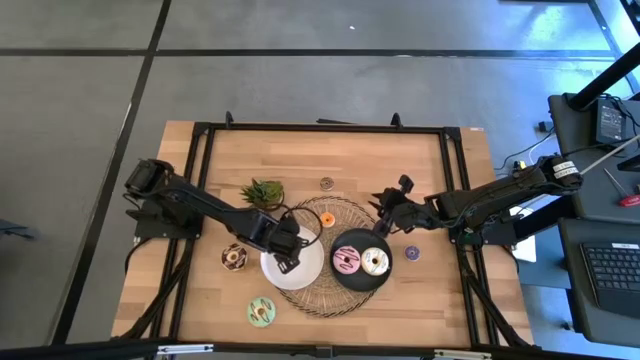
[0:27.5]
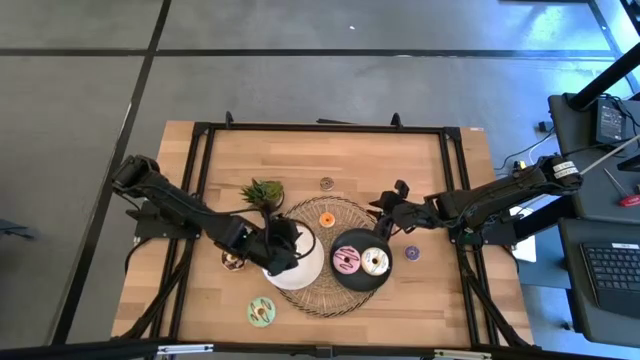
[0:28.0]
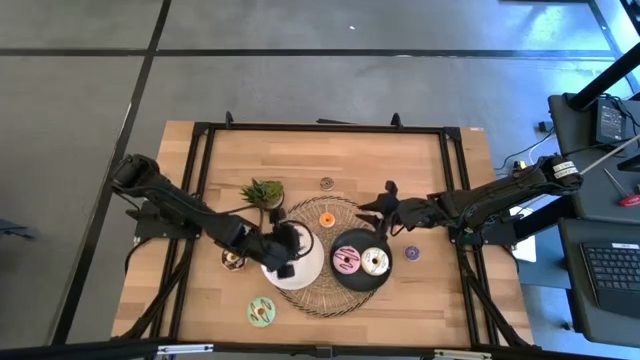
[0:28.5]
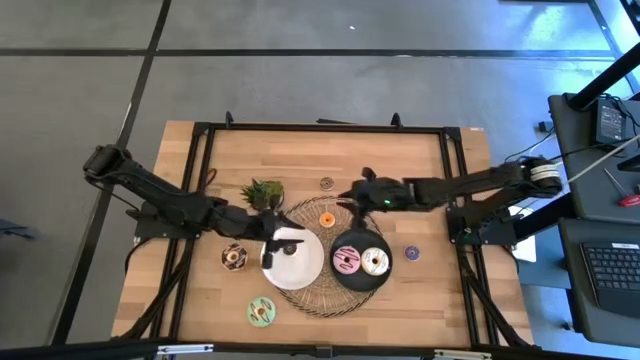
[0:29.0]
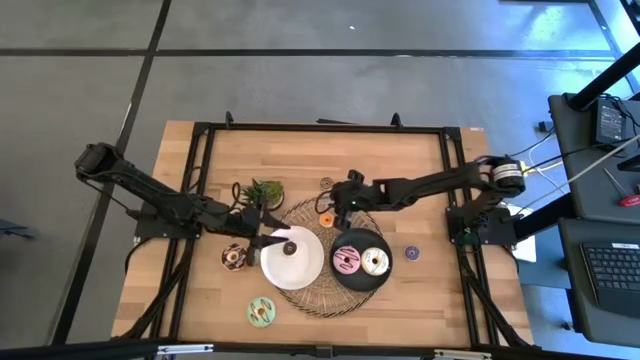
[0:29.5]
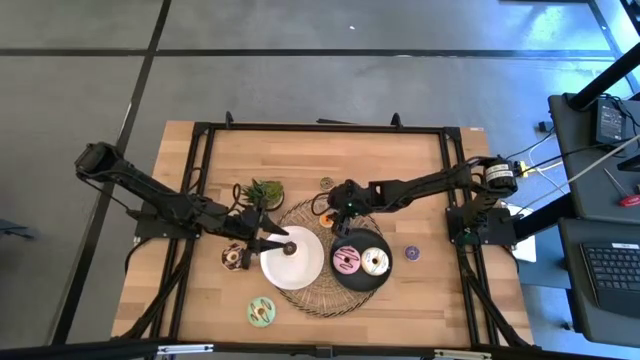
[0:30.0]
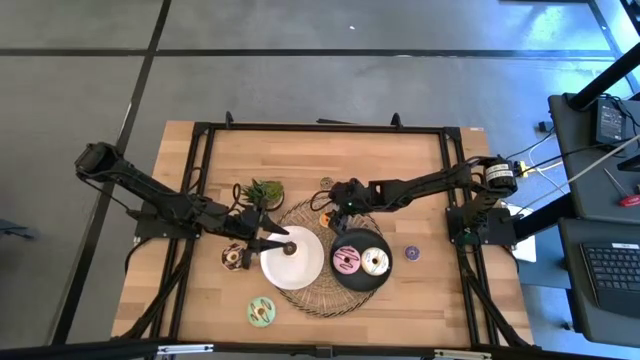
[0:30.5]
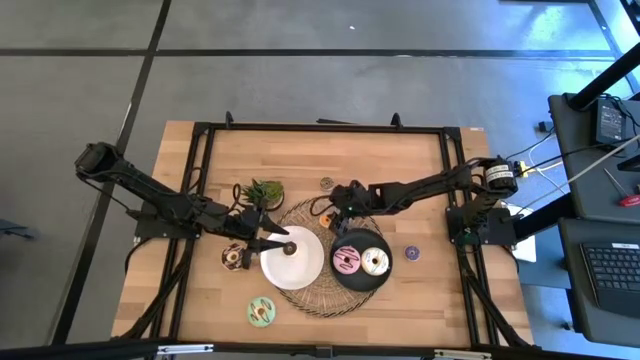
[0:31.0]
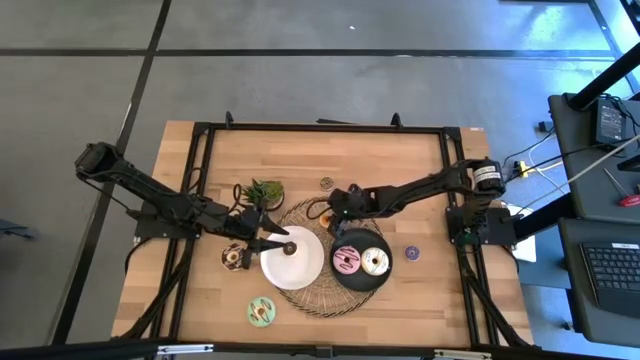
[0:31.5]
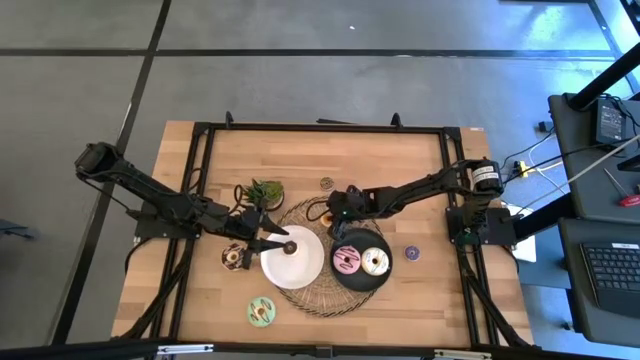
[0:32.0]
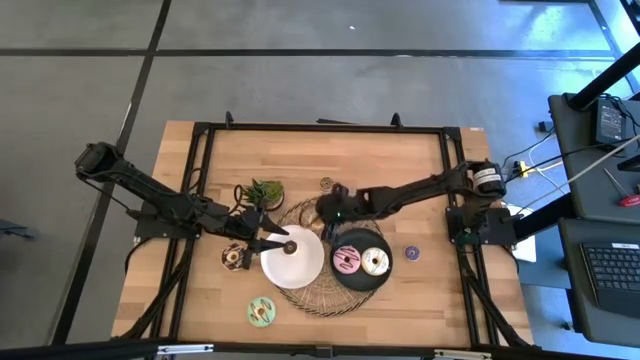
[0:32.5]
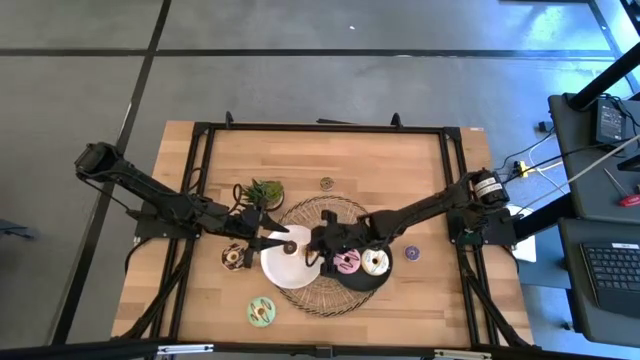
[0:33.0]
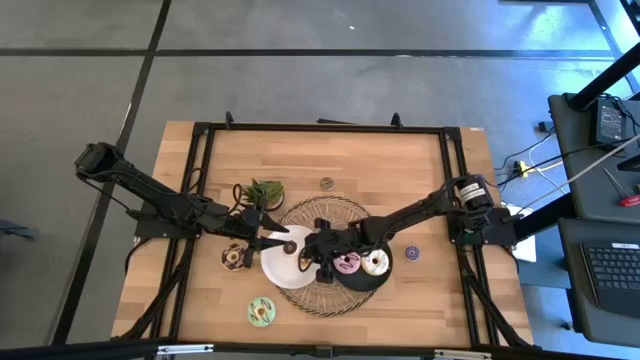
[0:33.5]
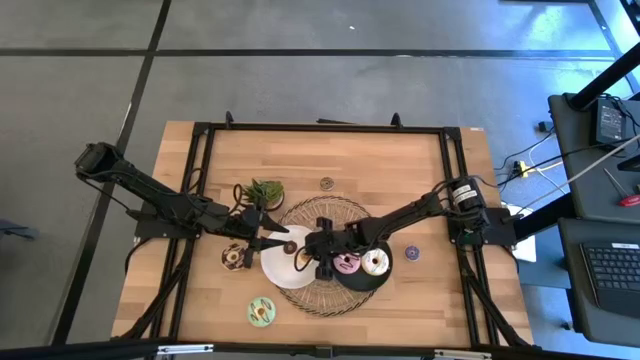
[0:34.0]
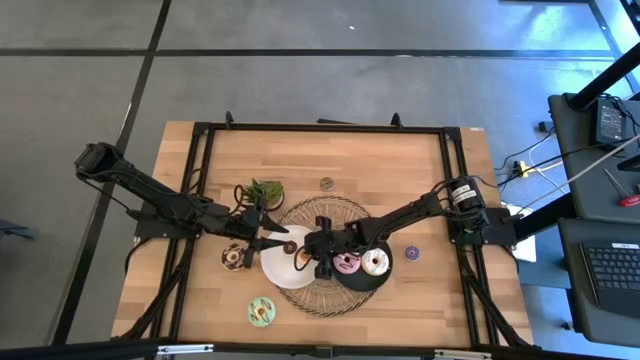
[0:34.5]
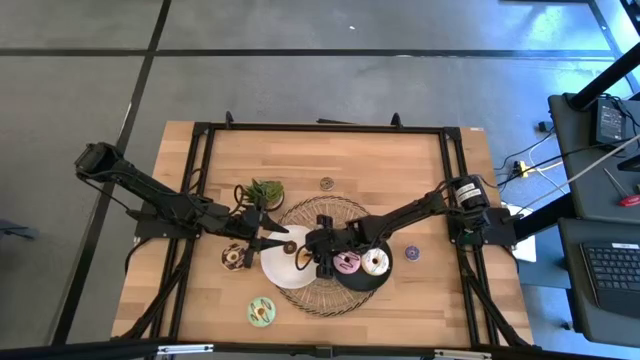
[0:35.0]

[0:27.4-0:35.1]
Task: Pick & Place donuts
Put the small yellow donut on the white plate

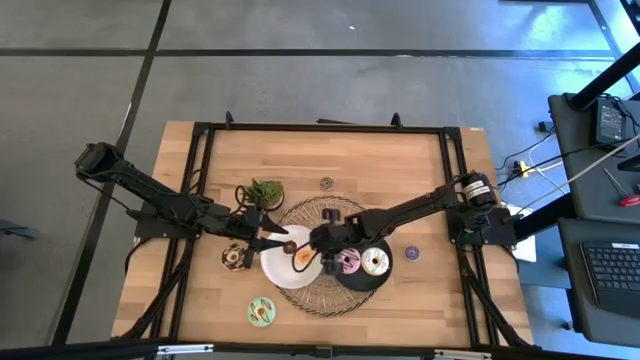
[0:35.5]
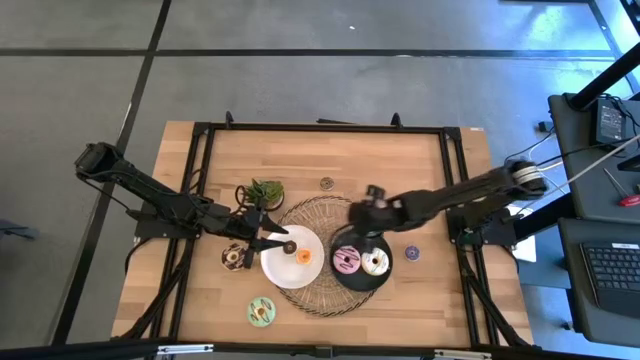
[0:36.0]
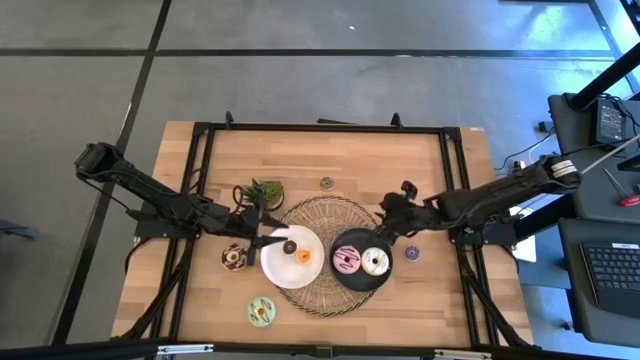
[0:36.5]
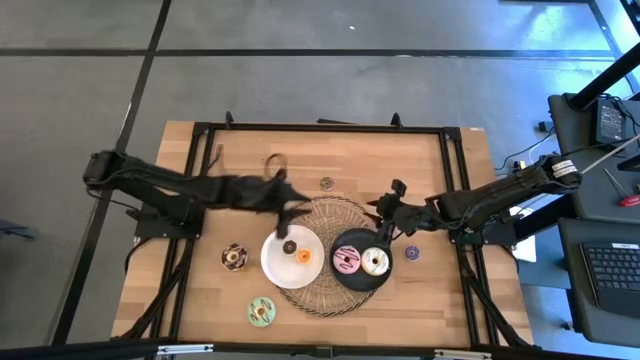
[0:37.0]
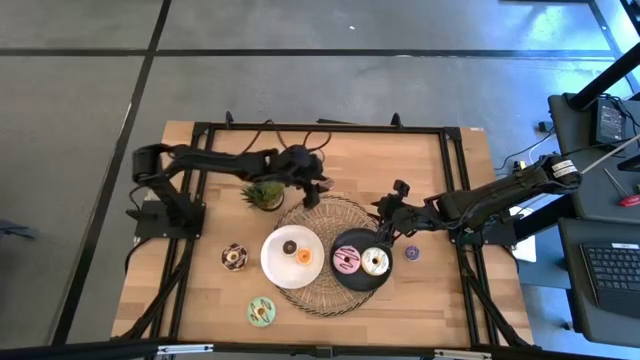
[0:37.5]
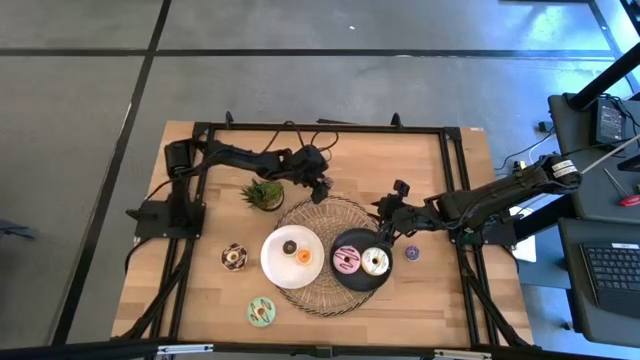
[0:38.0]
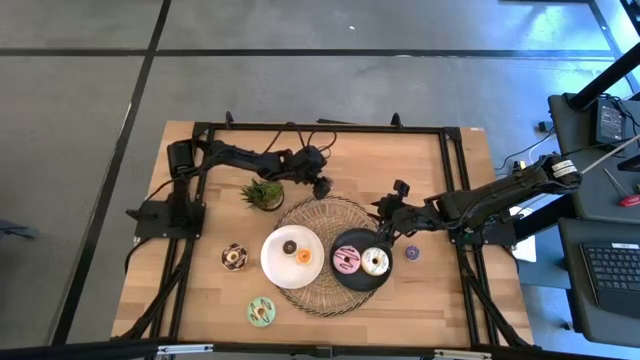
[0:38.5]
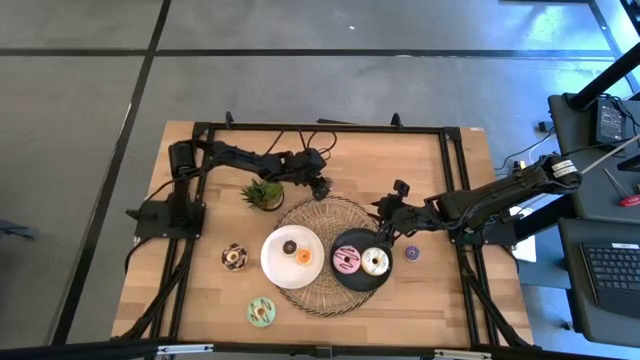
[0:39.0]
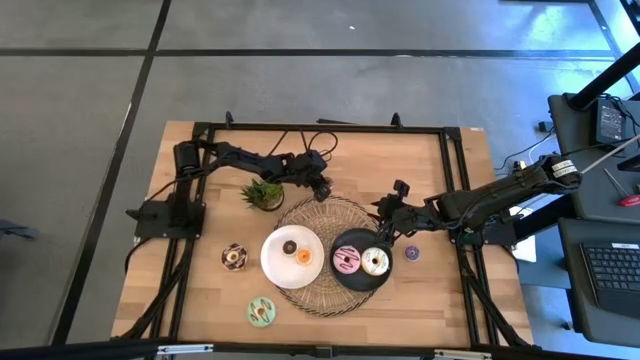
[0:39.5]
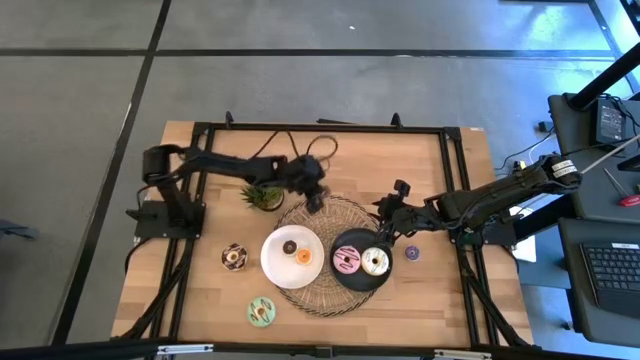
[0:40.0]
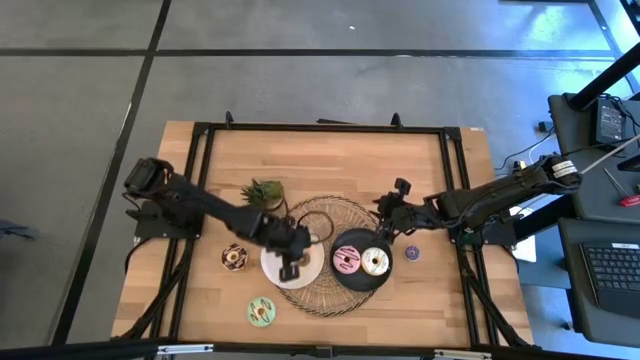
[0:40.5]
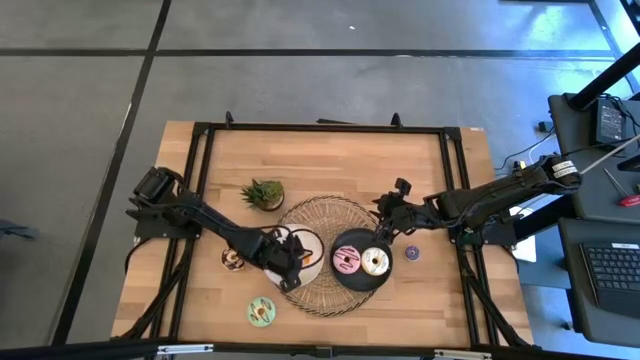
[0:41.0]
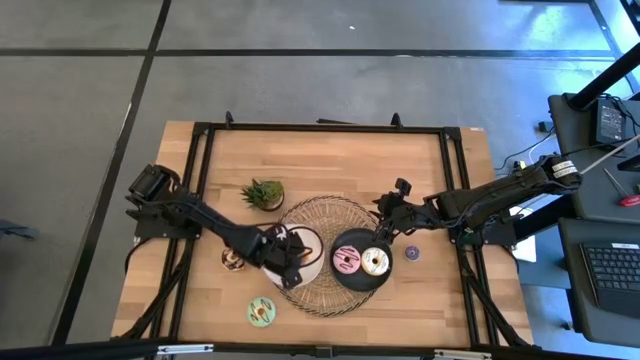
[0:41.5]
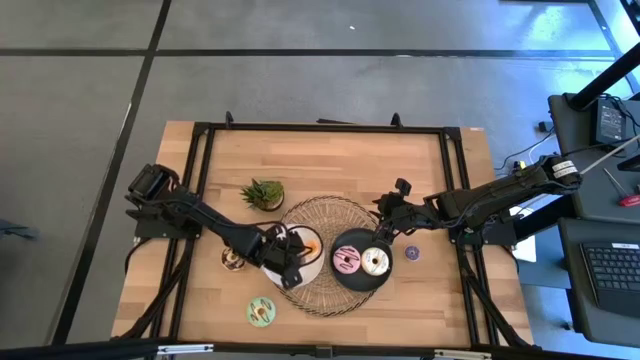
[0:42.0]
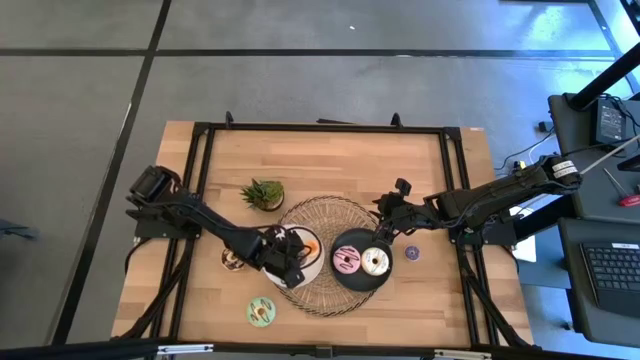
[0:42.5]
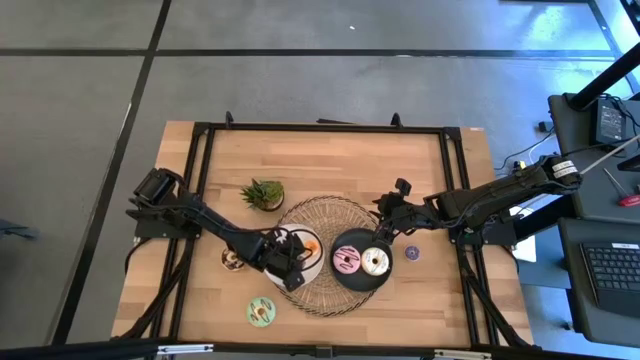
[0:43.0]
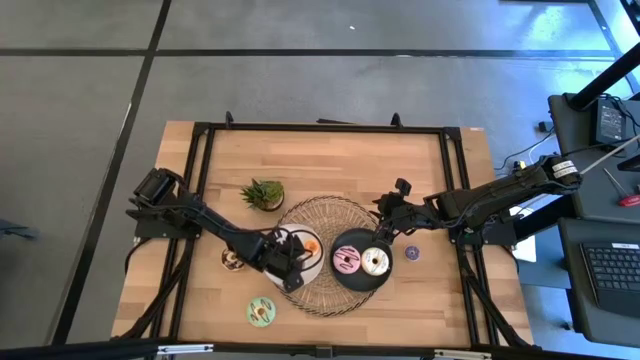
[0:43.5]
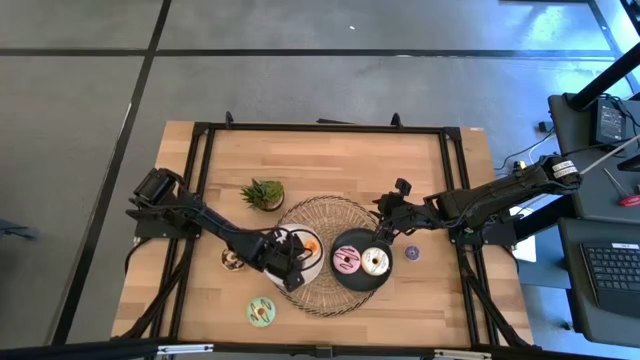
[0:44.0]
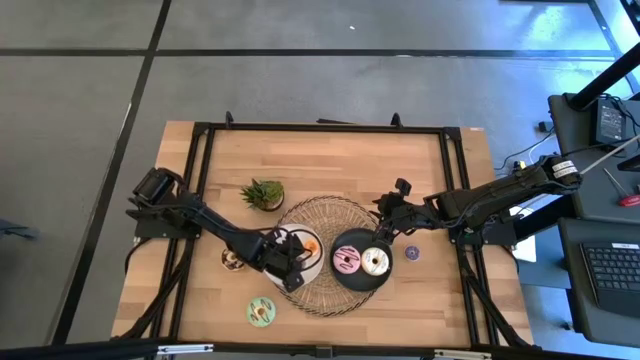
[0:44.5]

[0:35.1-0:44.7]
Put the small brown donut on the white plate

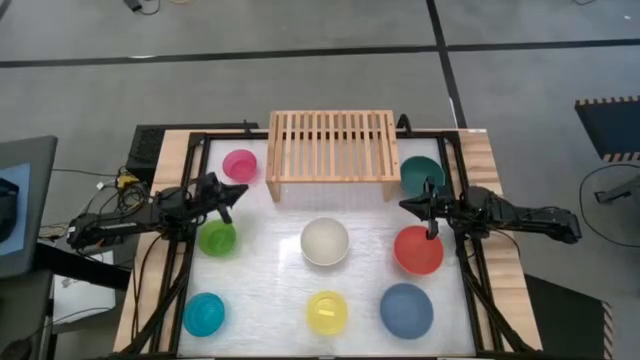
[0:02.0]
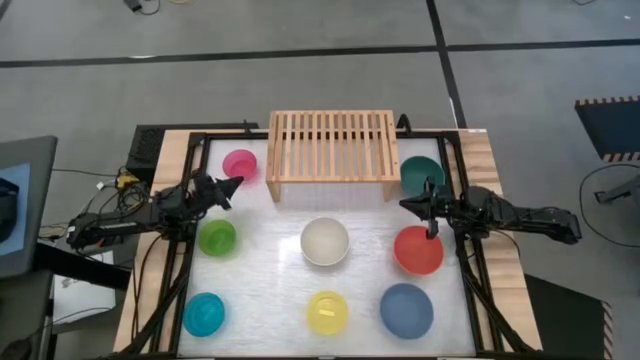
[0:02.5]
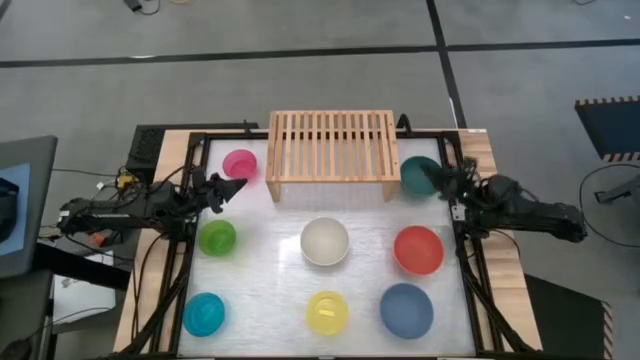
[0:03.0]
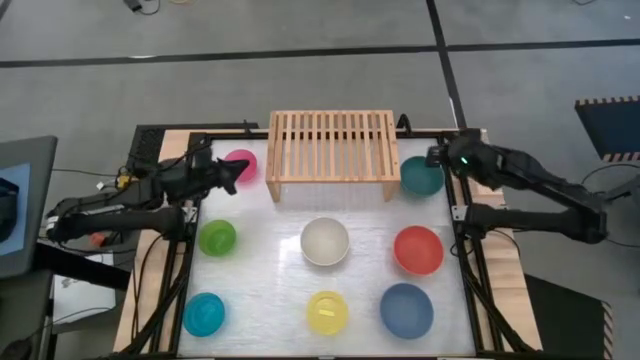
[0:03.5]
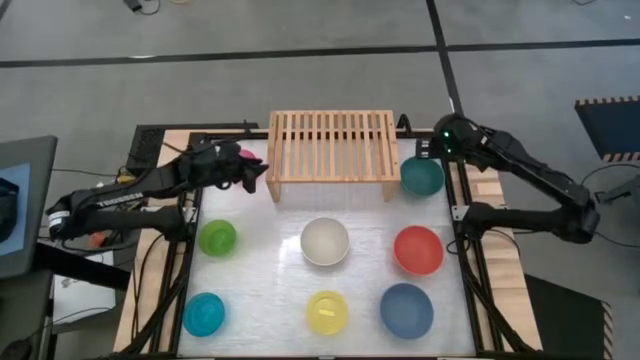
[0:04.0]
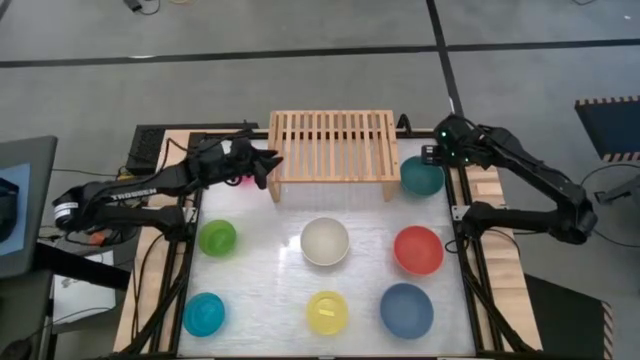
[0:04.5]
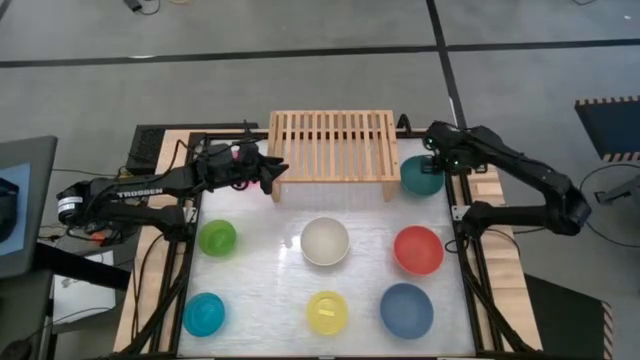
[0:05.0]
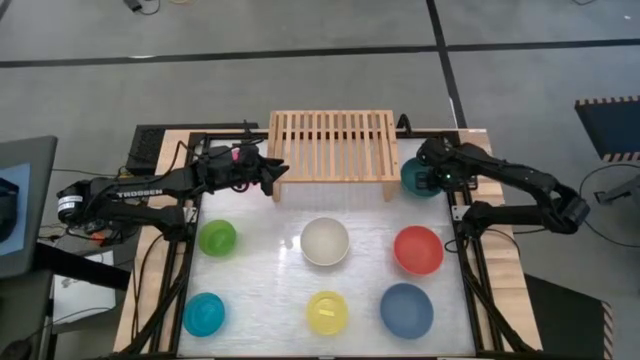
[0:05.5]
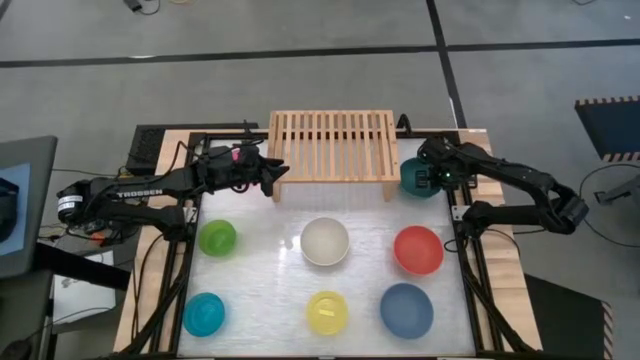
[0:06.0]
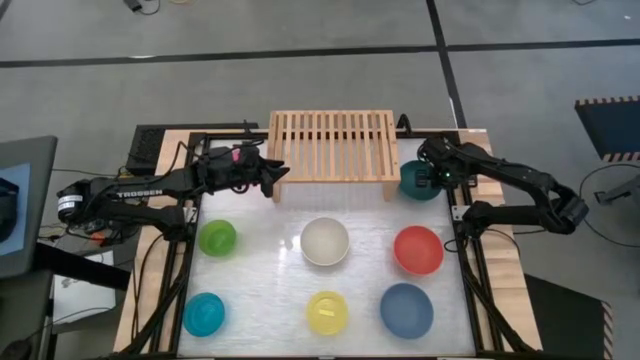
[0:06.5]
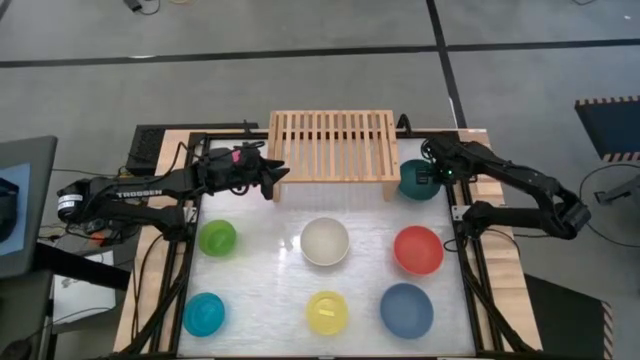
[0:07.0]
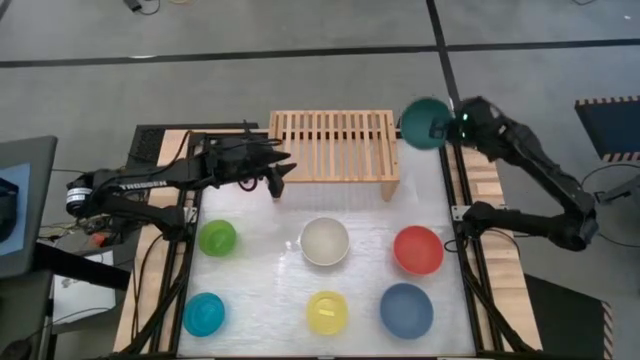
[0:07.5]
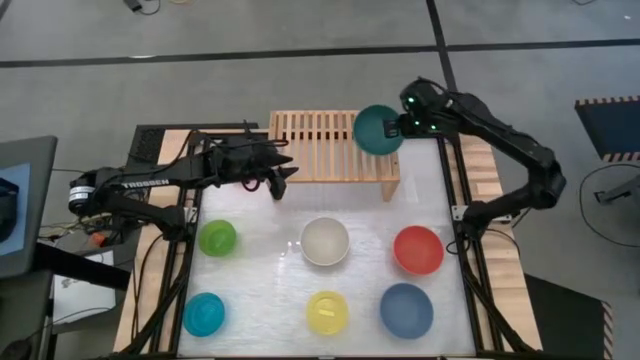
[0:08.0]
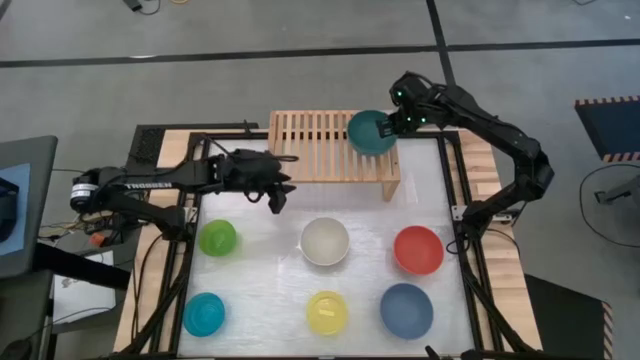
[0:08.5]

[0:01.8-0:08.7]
Task: Place and stack bowls onto a shelf
Put the dark green bowl on the shelf
